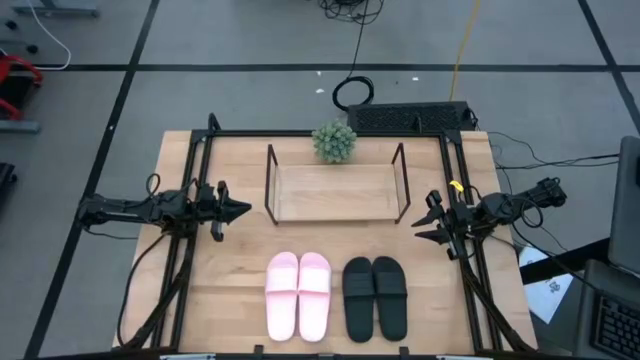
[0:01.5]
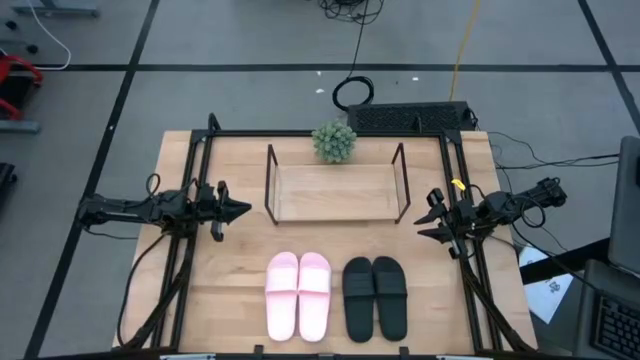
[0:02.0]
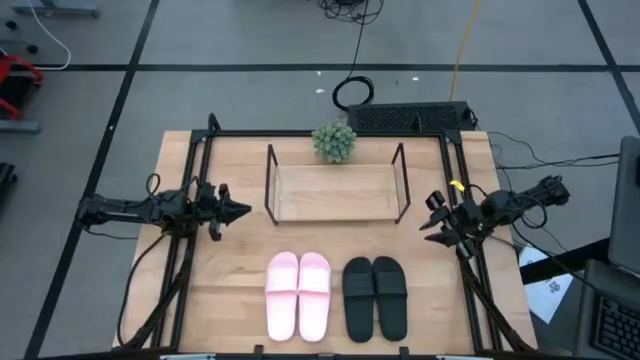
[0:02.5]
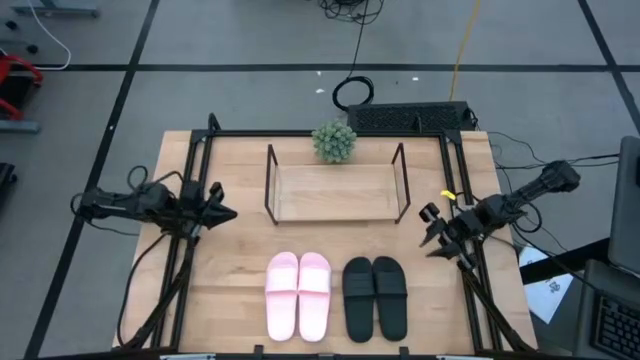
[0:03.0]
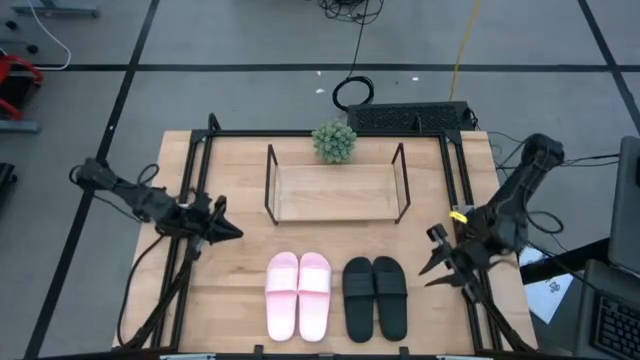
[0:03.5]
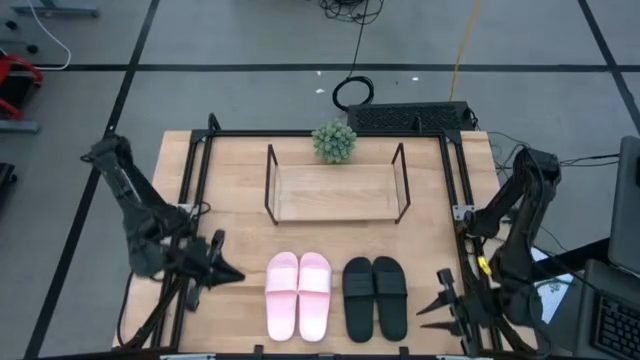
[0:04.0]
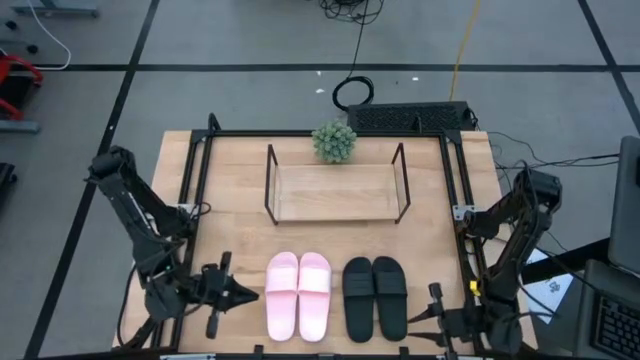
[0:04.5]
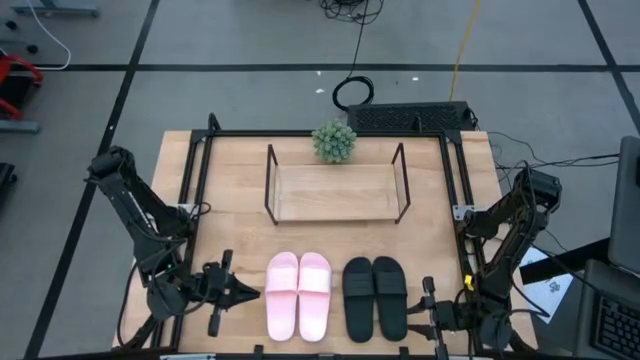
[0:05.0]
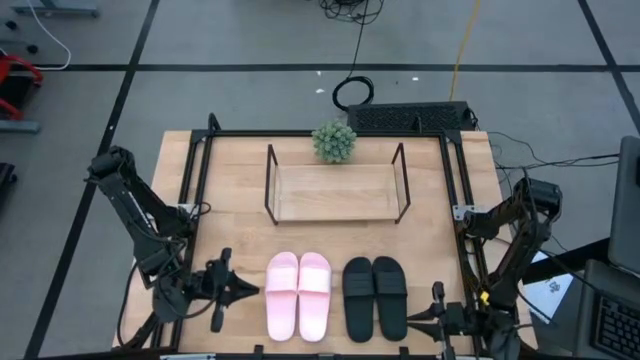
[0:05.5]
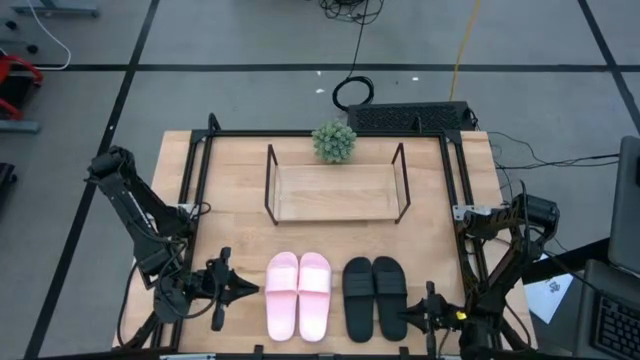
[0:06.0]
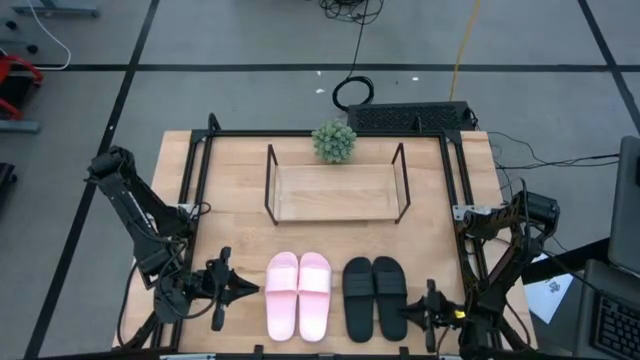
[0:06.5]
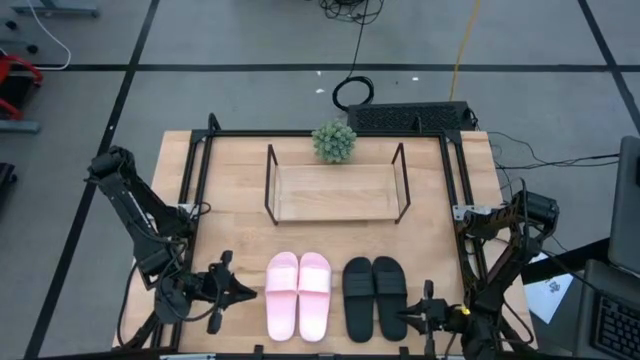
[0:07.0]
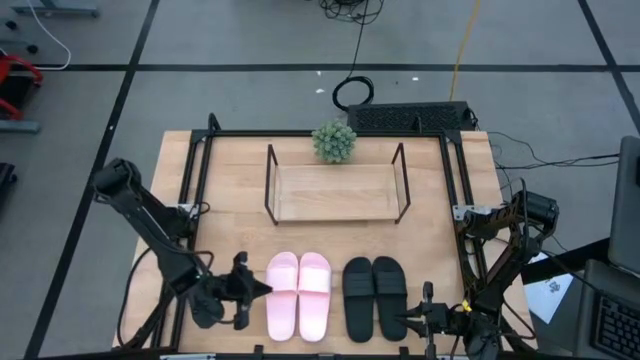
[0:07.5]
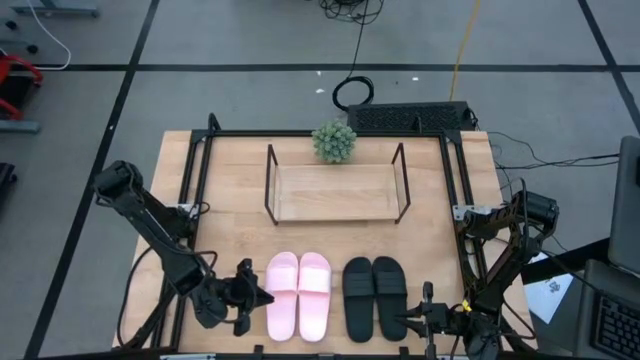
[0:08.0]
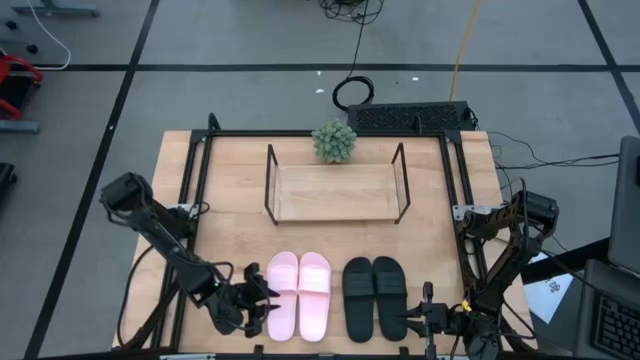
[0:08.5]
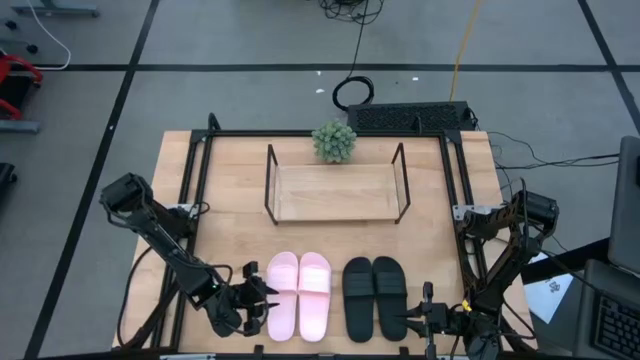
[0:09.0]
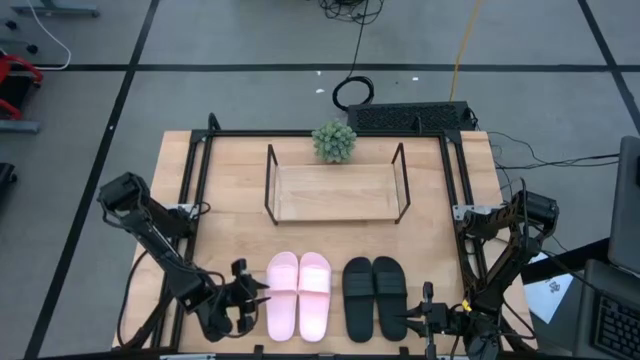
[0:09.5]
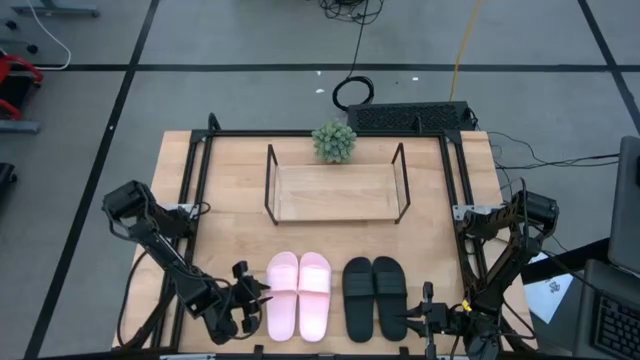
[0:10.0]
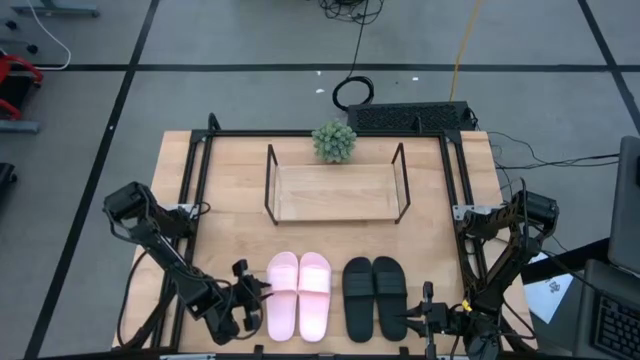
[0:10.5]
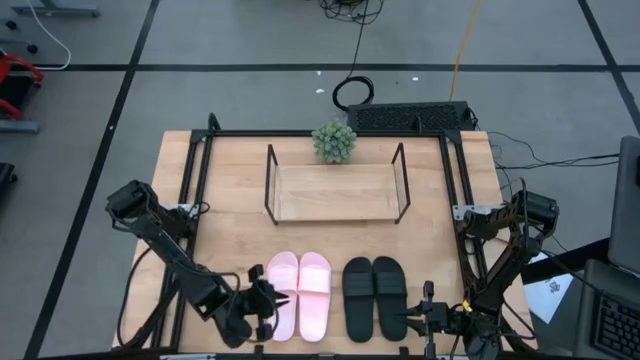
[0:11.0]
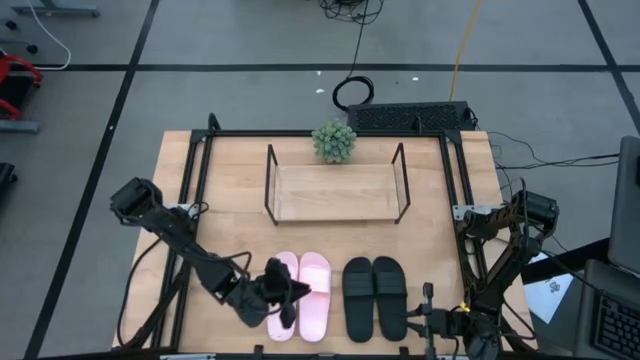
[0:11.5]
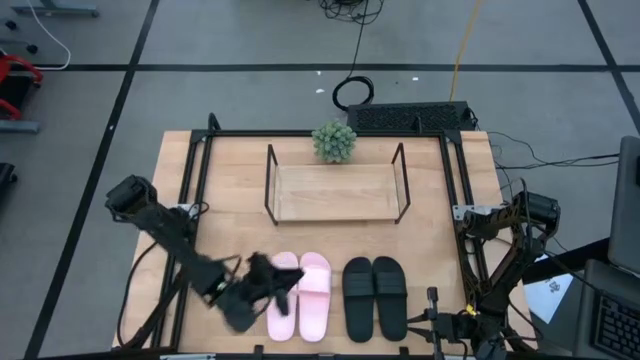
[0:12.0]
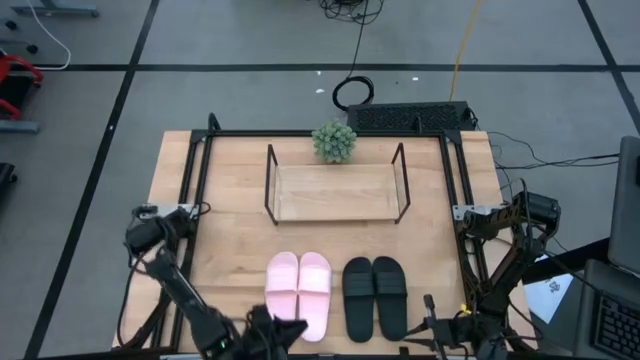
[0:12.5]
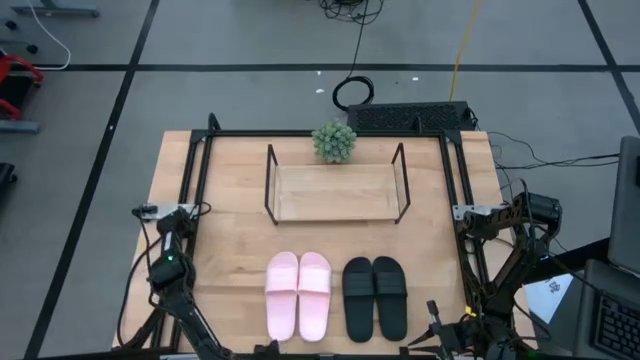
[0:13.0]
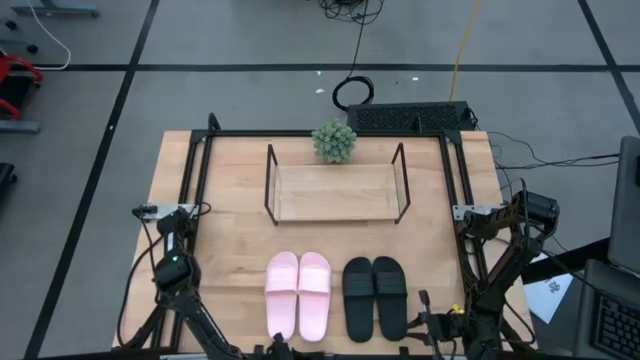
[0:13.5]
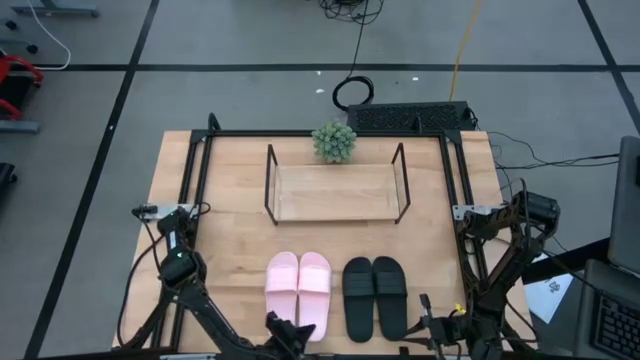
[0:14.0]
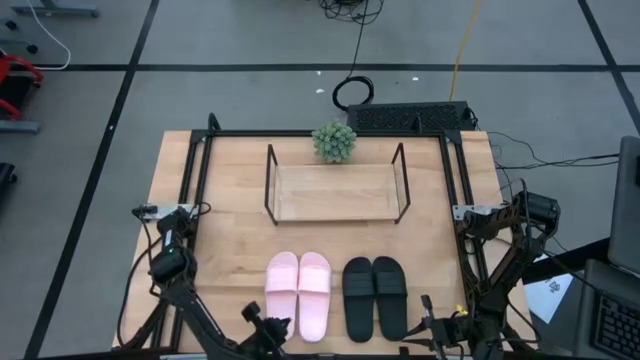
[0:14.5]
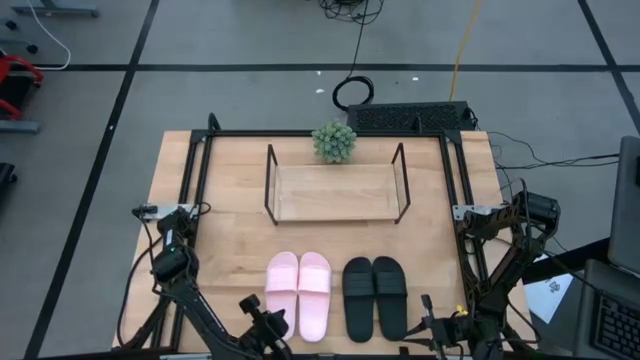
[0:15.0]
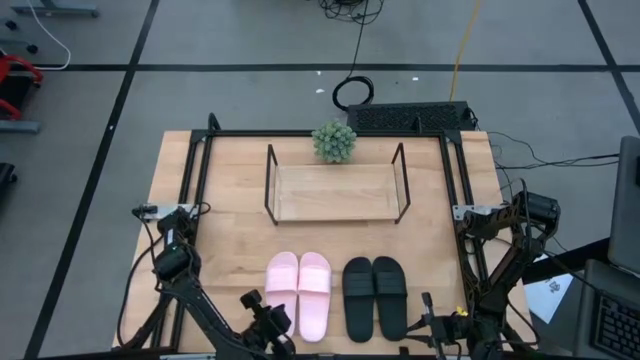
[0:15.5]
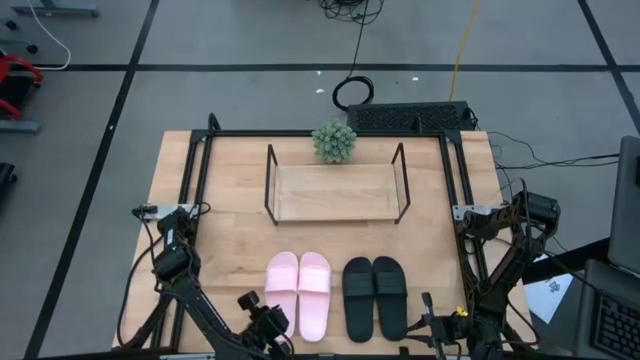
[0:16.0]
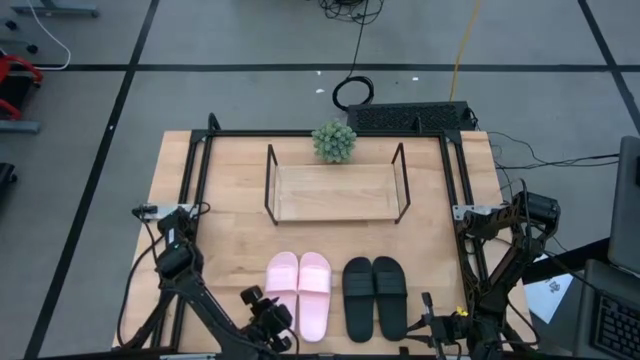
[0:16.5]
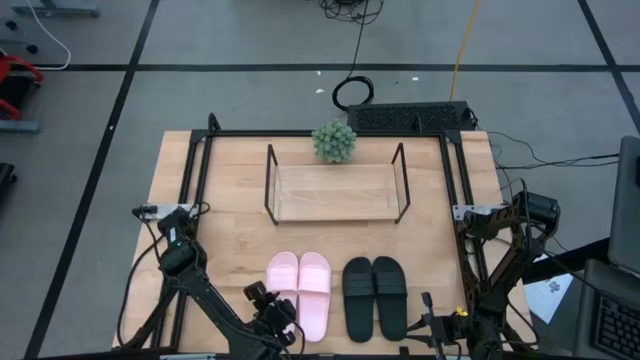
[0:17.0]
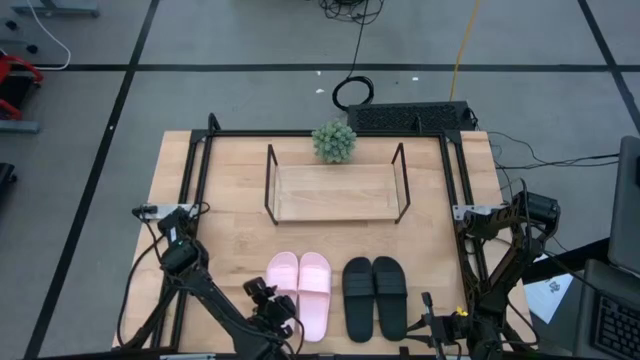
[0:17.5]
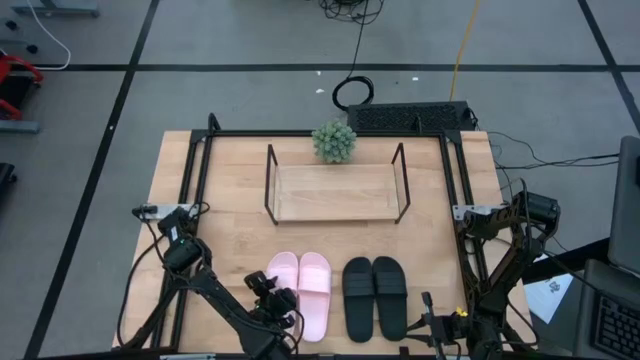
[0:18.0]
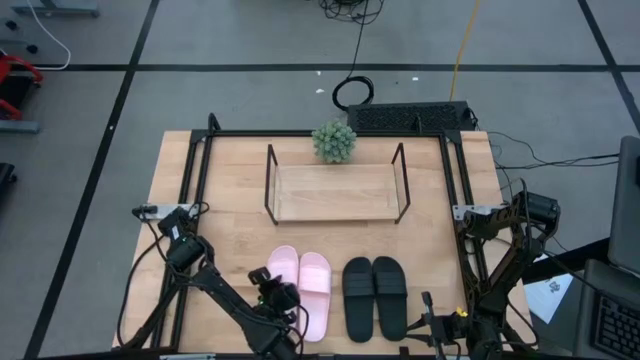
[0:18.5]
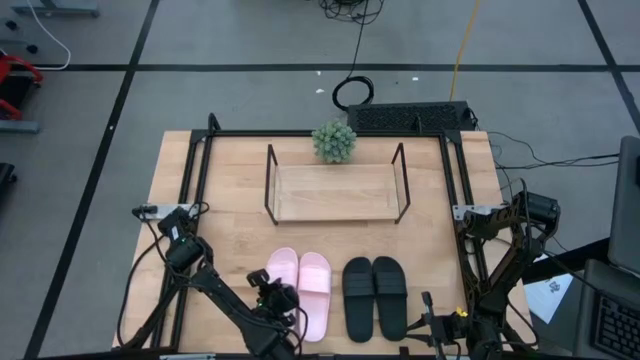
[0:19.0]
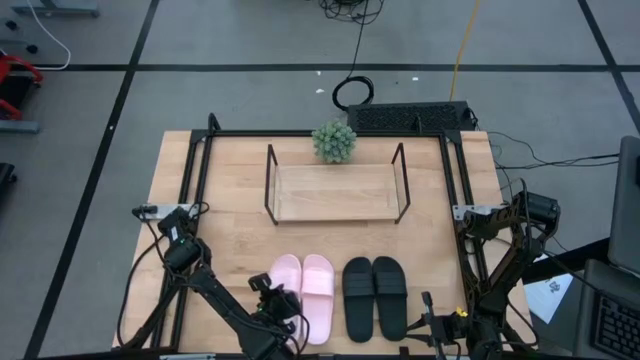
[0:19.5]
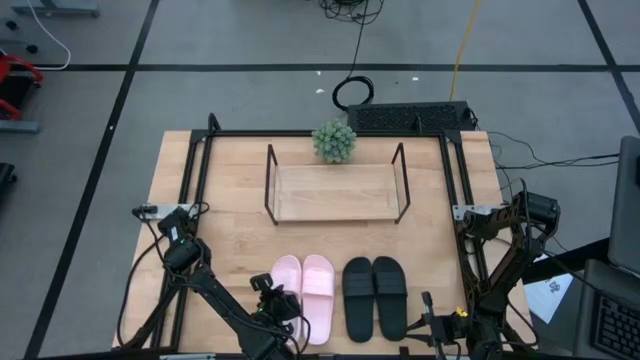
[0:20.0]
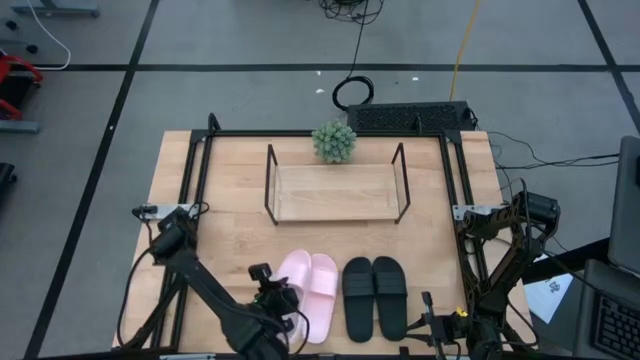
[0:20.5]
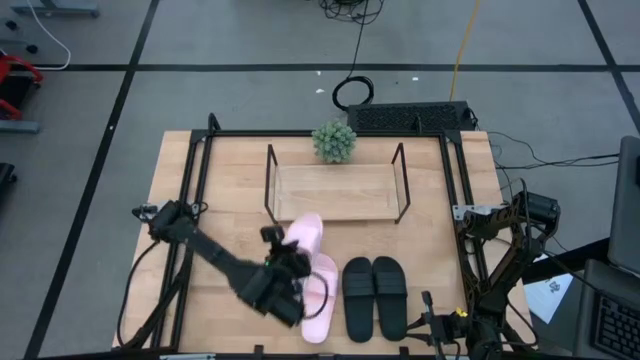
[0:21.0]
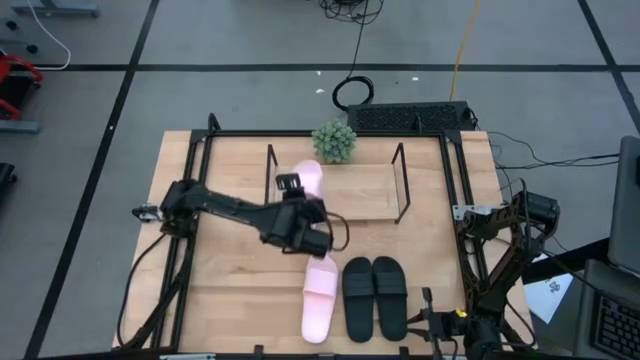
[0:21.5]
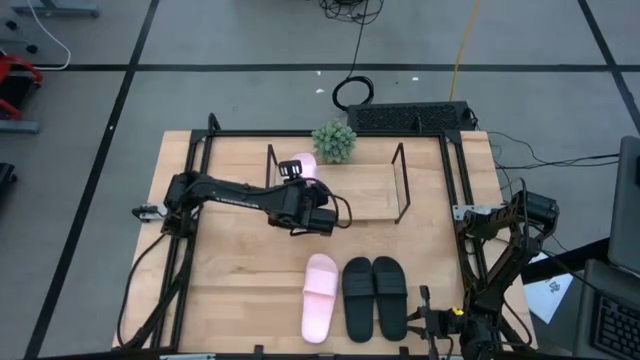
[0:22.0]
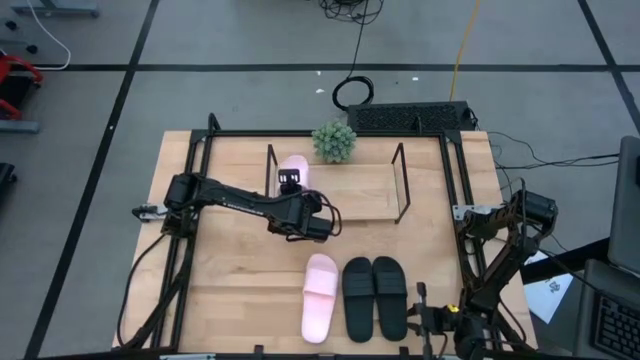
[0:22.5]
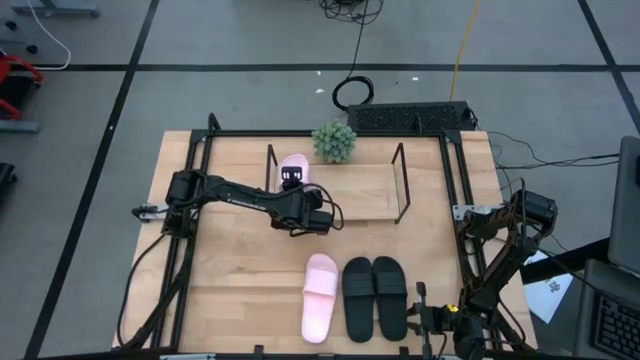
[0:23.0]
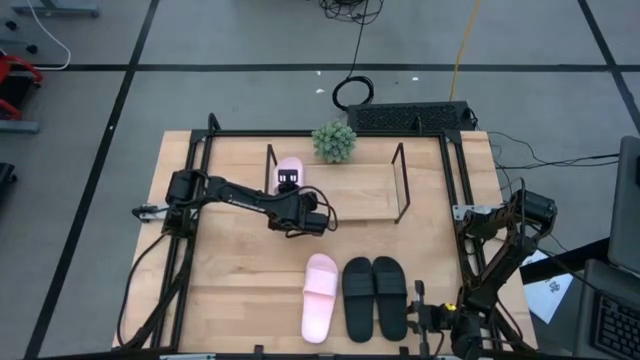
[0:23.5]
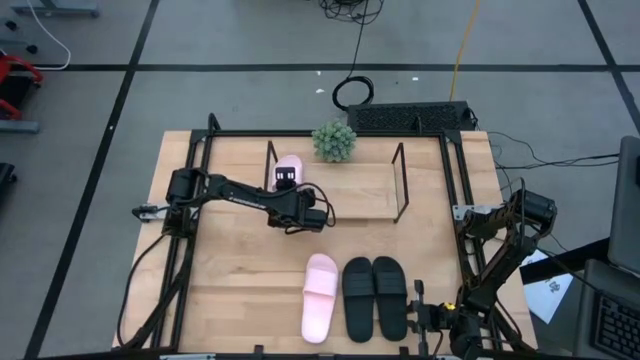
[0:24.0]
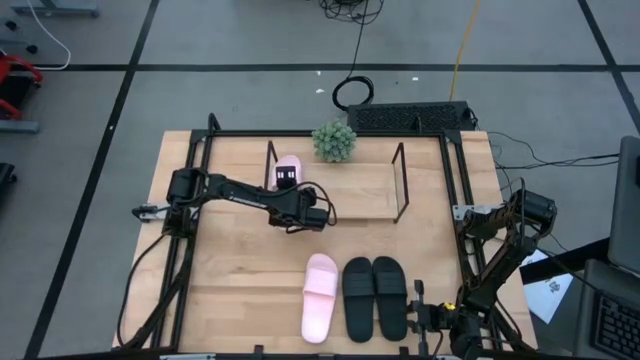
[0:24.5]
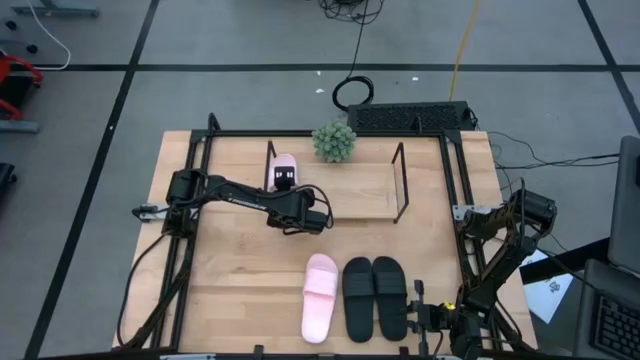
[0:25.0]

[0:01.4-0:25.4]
Task: Pick and place slides into the shelf
Put the left pink slipper on the shelf
